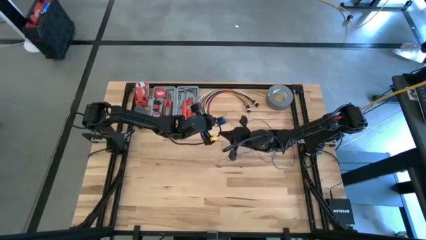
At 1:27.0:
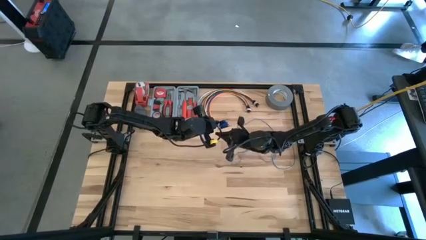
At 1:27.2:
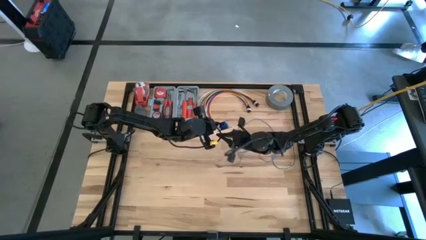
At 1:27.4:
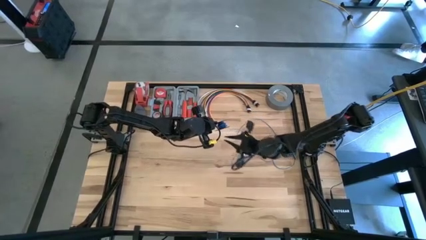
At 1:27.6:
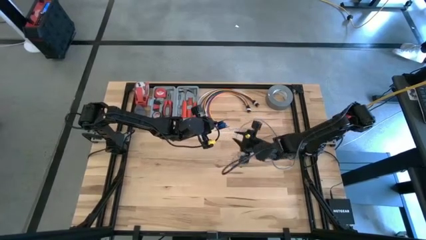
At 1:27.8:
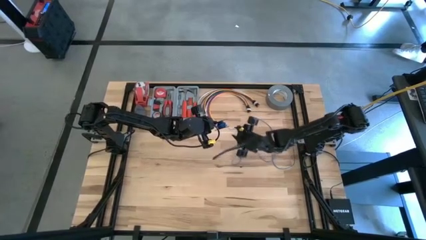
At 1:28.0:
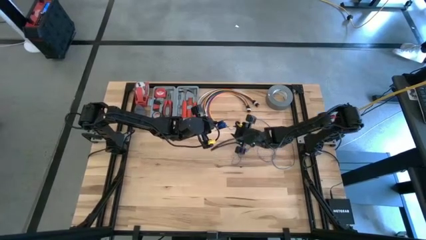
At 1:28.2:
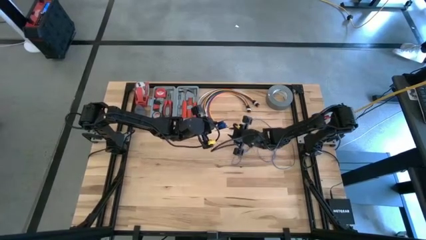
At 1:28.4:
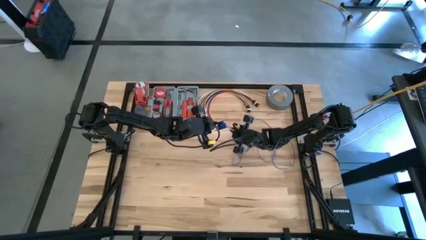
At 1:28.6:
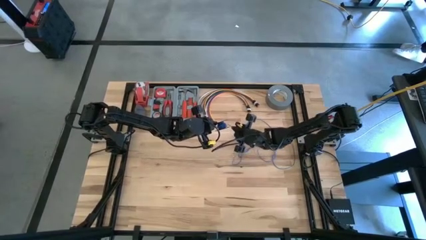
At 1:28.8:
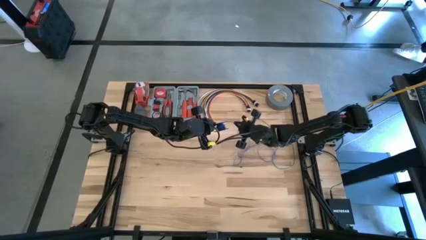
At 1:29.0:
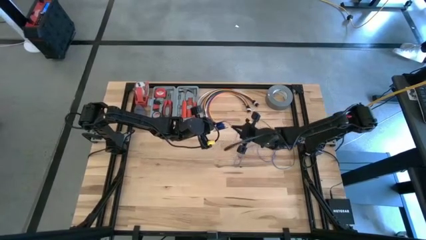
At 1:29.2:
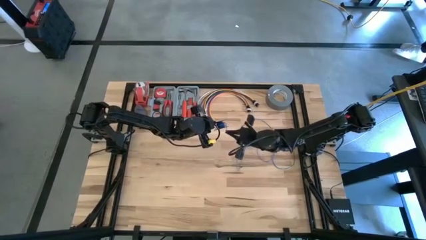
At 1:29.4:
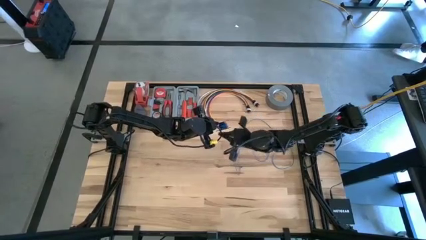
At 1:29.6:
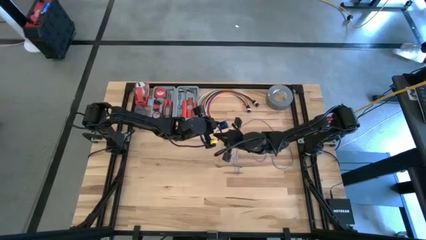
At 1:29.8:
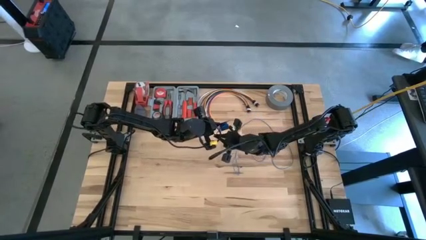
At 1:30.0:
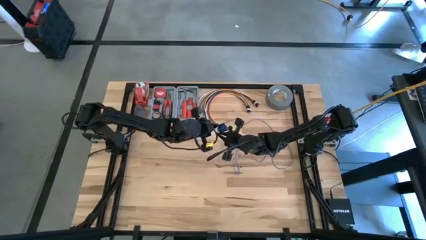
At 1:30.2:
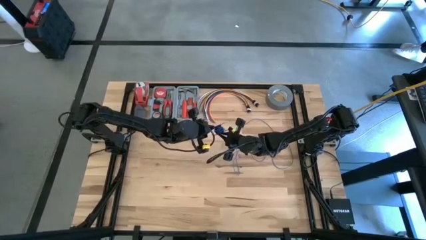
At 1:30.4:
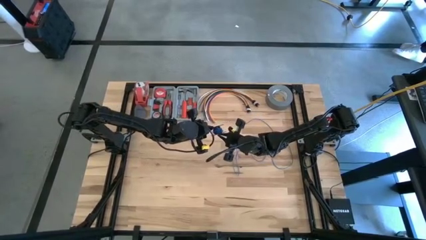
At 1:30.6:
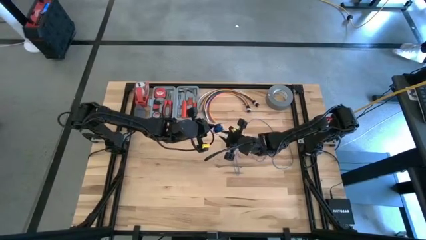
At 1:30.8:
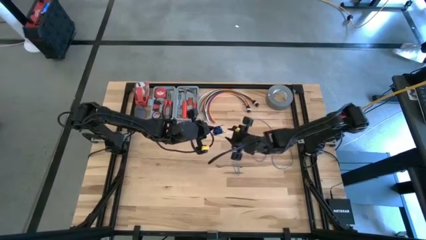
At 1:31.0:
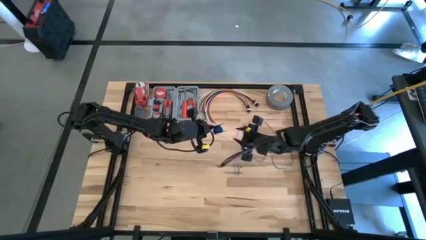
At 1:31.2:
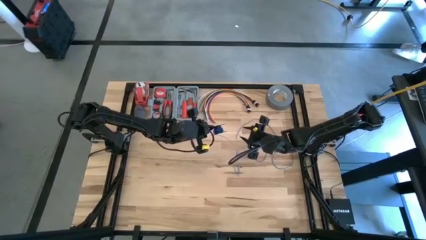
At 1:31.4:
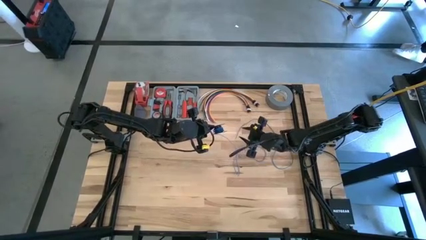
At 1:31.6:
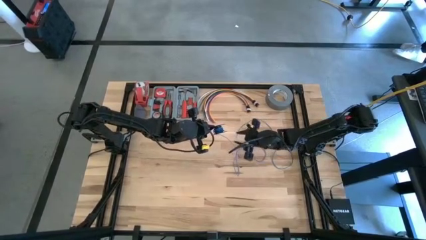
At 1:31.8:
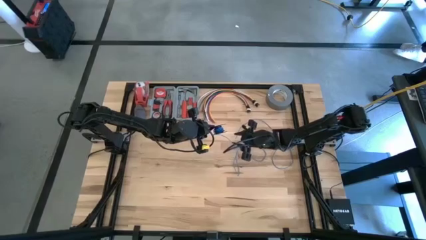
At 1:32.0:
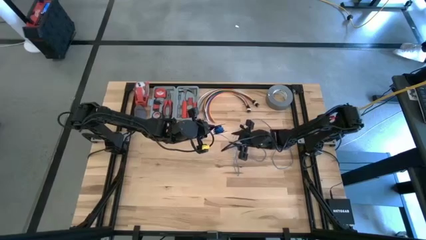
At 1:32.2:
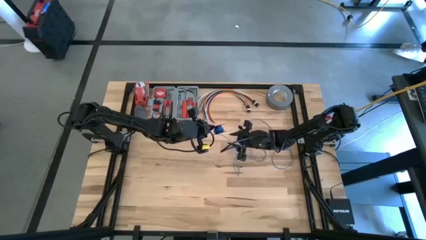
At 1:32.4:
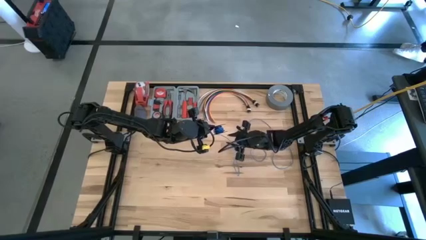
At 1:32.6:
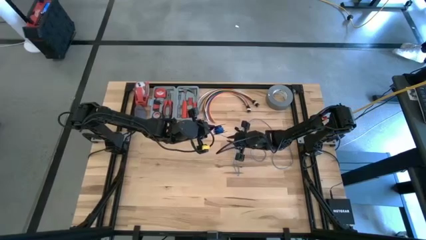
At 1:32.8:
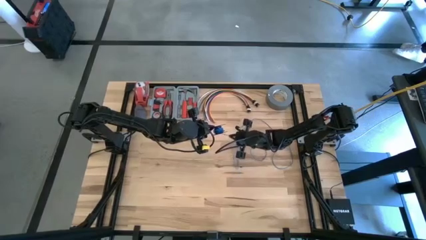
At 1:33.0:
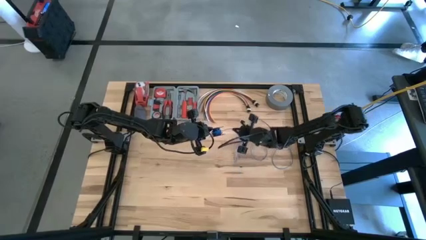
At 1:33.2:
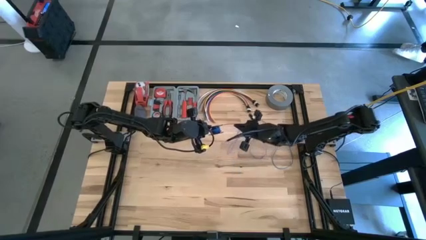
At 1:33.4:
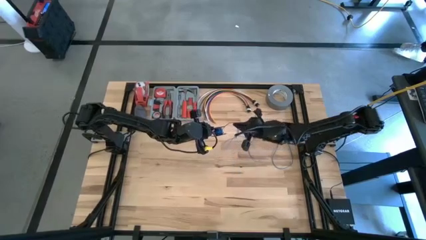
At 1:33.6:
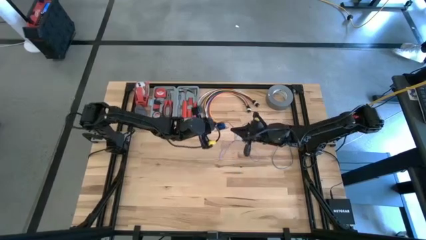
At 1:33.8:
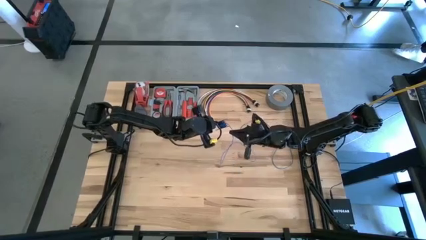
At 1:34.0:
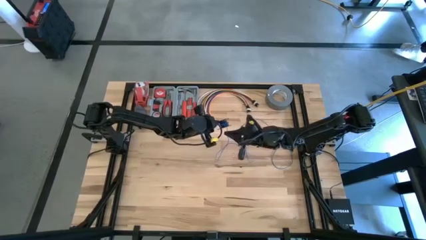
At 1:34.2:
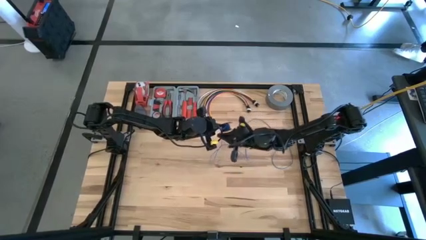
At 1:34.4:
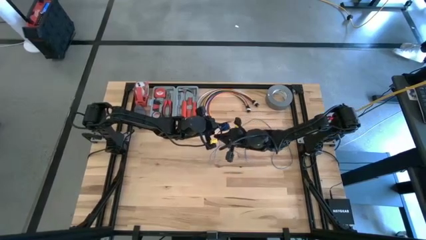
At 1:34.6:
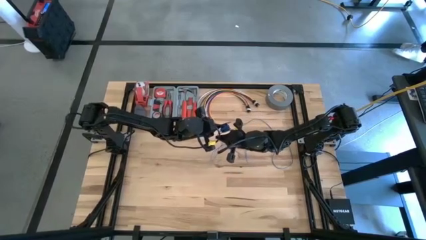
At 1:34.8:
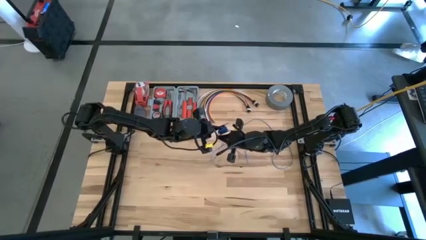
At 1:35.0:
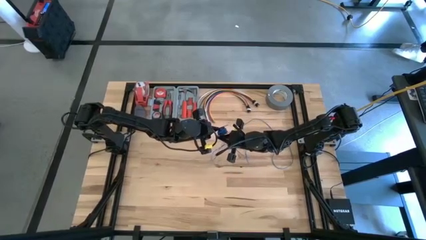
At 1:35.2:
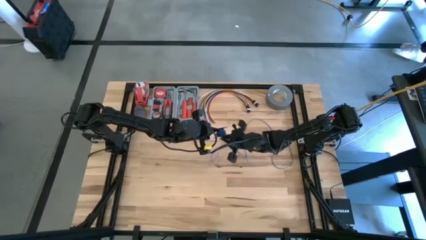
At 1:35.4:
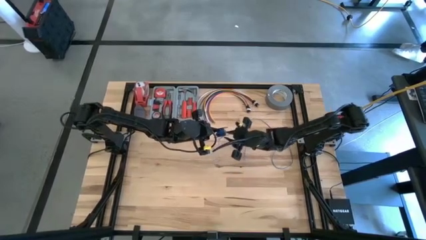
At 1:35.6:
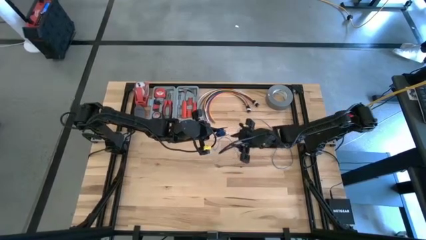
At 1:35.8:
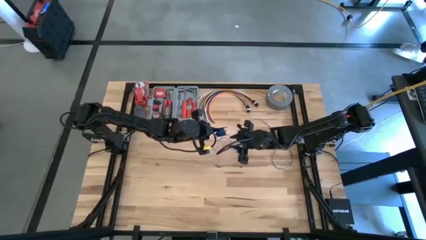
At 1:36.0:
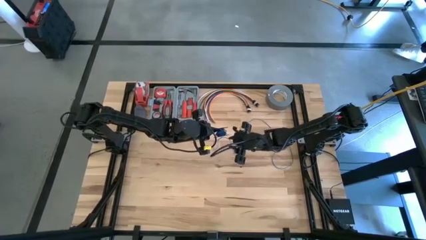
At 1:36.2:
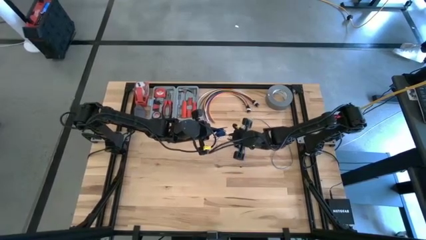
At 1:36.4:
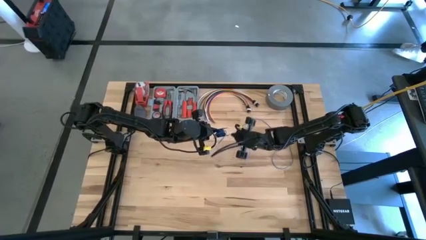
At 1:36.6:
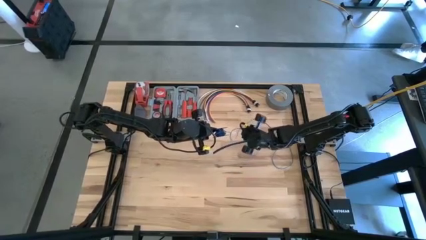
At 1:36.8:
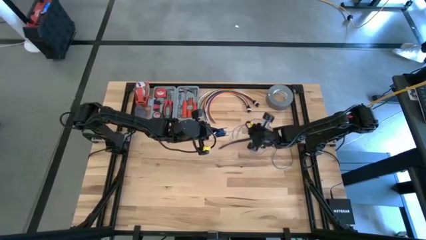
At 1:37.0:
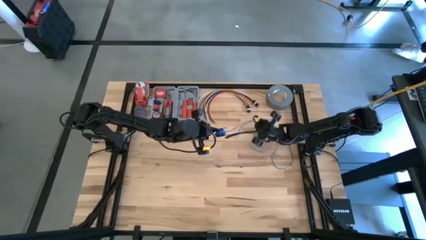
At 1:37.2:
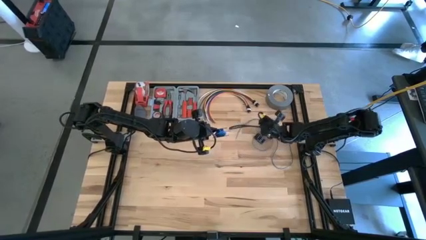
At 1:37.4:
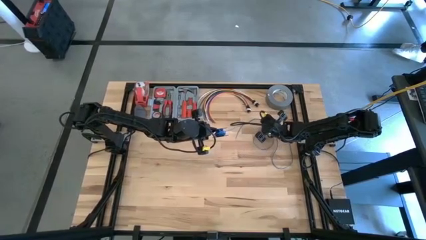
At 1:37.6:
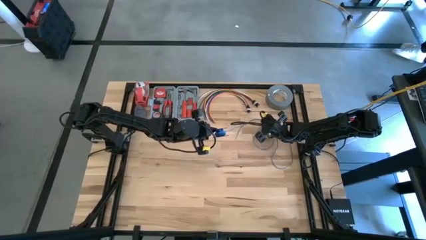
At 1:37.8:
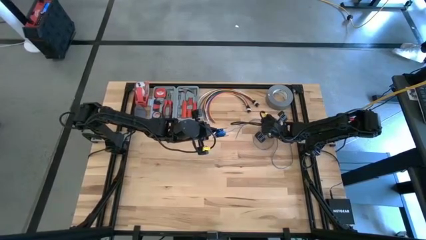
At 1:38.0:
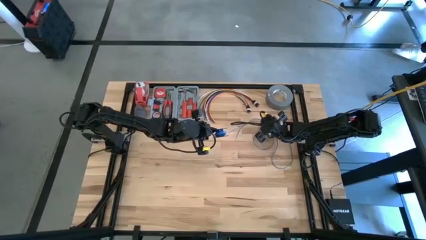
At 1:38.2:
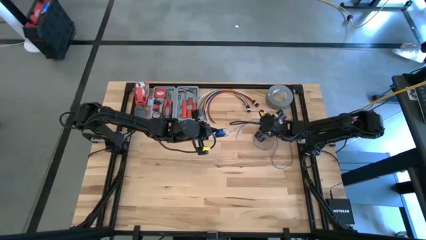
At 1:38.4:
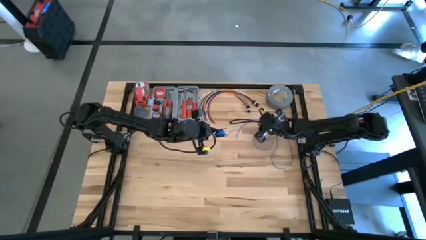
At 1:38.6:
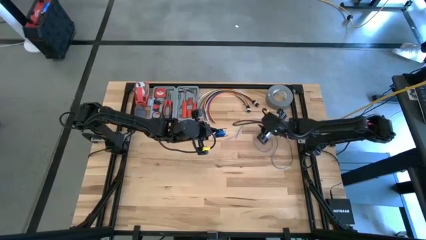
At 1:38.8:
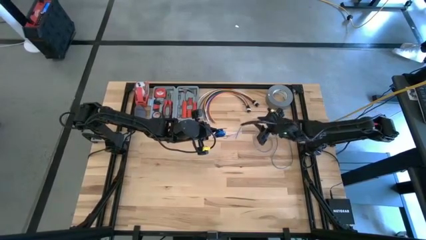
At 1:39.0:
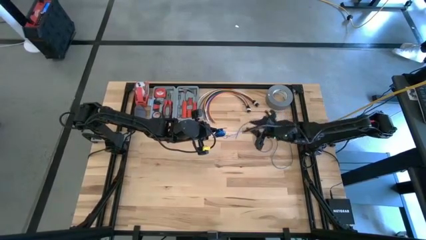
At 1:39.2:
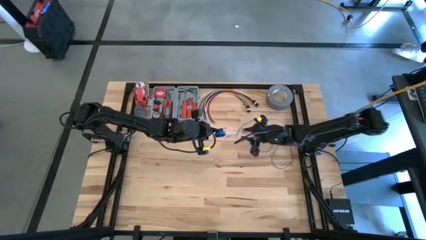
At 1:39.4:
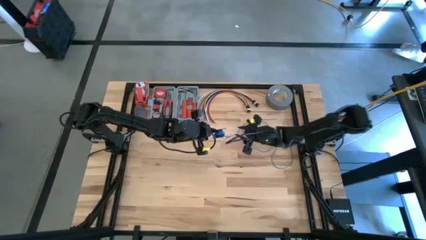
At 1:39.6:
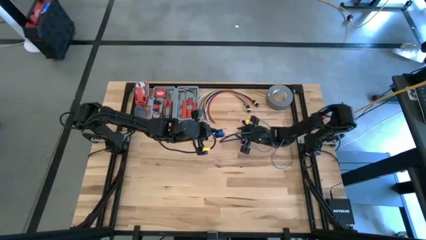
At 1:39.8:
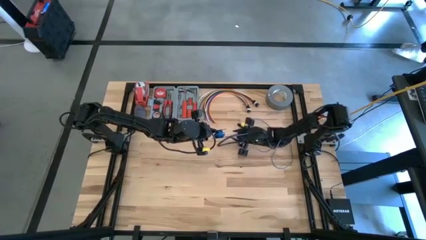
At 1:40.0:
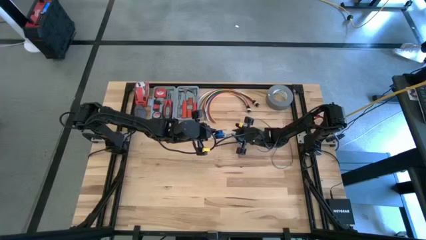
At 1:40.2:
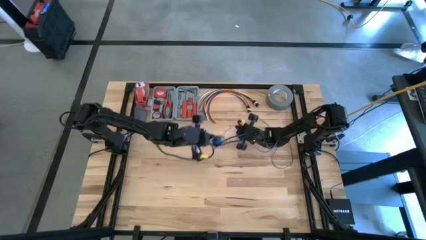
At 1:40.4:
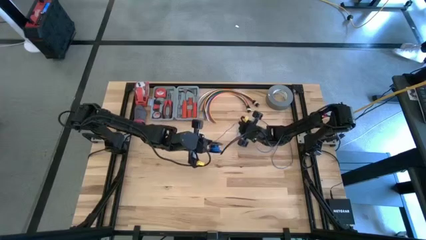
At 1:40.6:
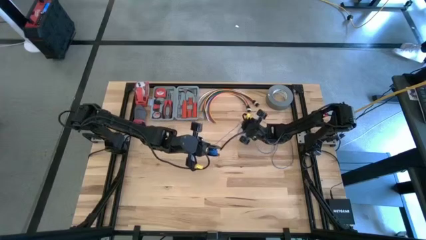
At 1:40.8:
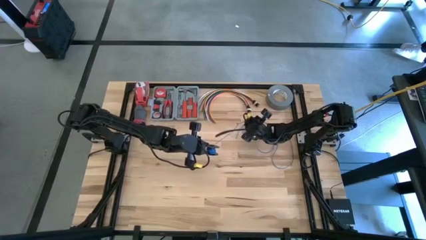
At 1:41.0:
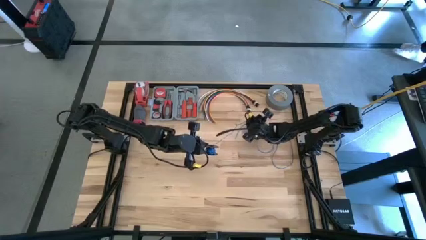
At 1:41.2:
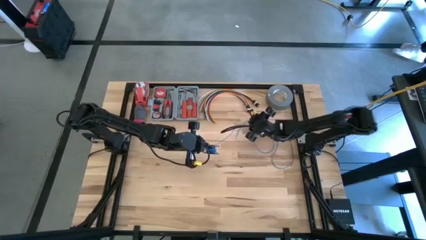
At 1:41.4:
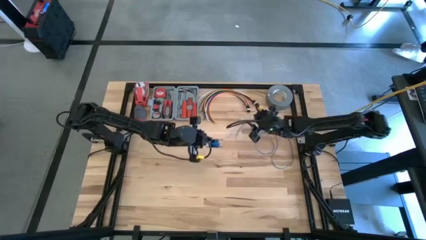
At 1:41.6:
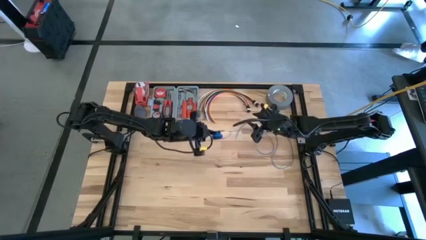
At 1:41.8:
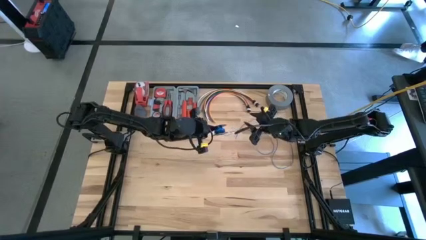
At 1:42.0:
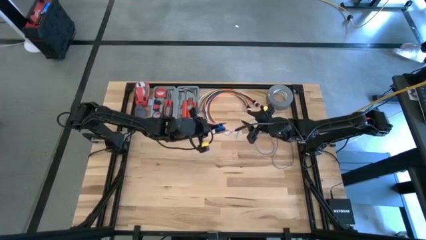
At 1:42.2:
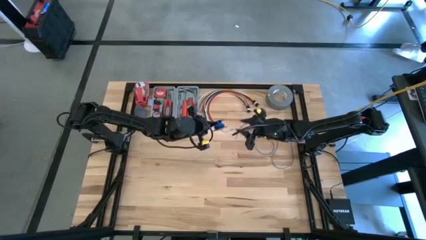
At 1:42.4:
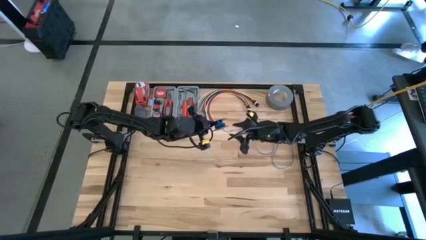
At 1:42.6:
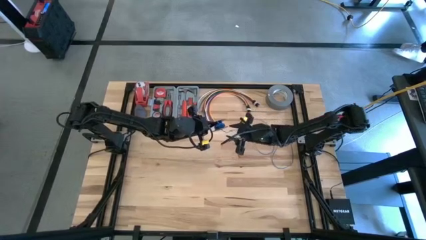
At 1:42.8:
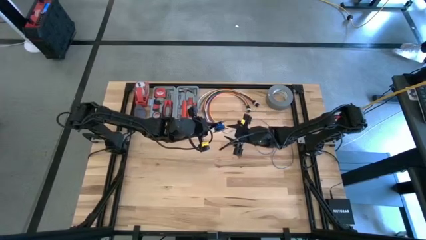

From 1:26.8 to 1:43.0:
Task: Coil cords
Coil the blue wire onto the black spool
